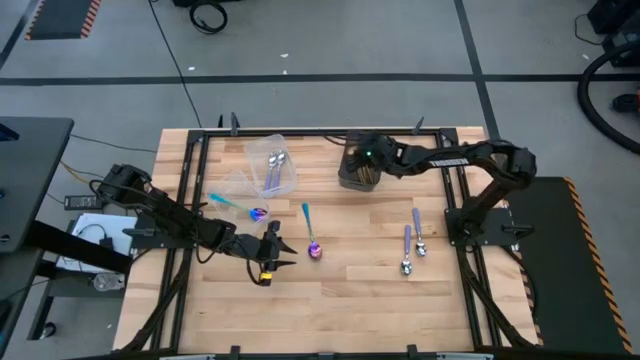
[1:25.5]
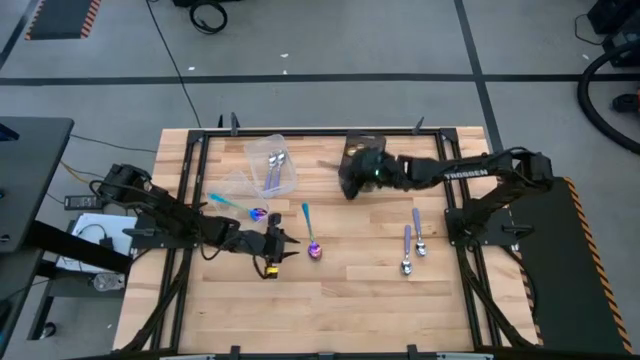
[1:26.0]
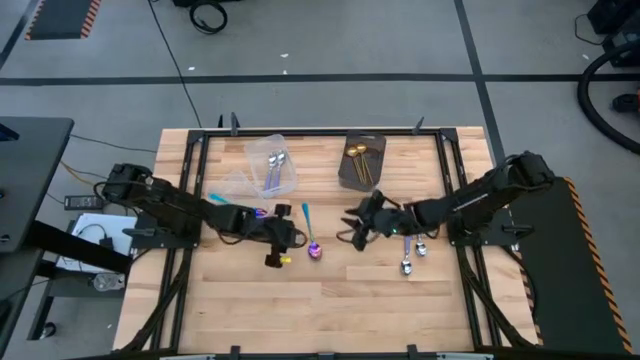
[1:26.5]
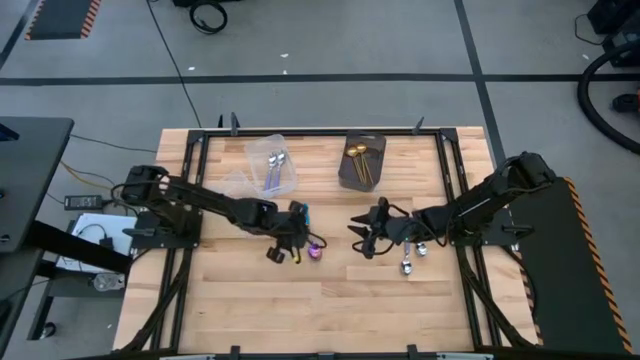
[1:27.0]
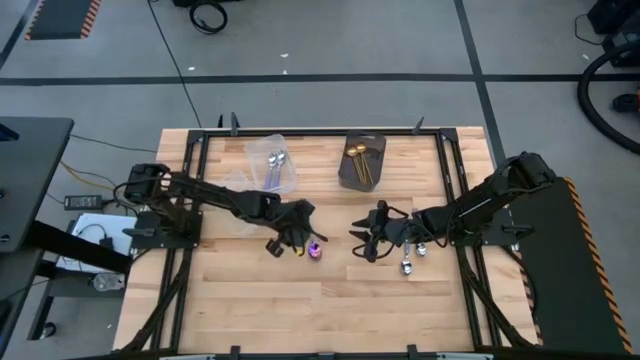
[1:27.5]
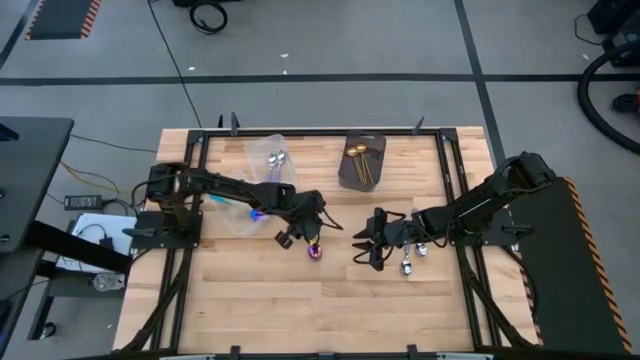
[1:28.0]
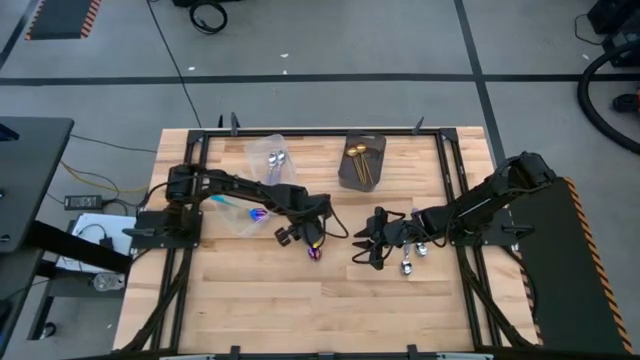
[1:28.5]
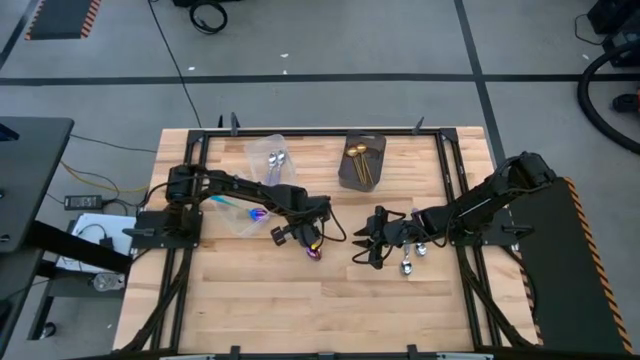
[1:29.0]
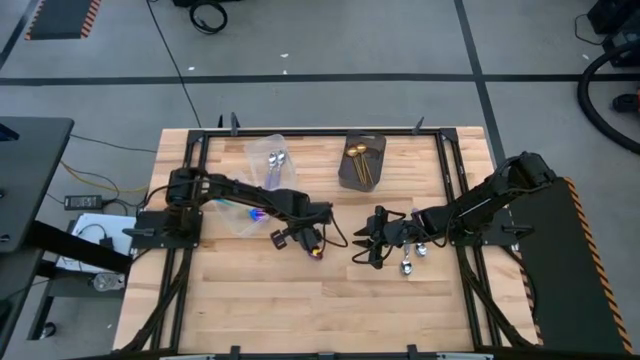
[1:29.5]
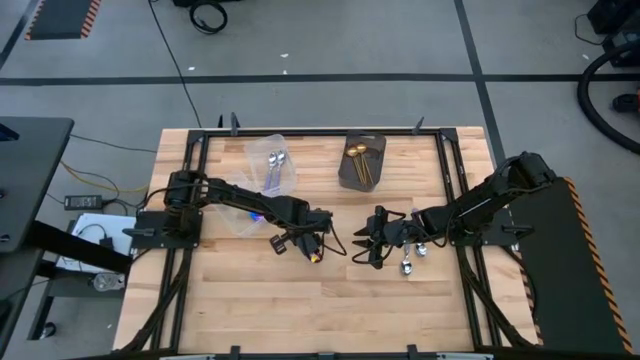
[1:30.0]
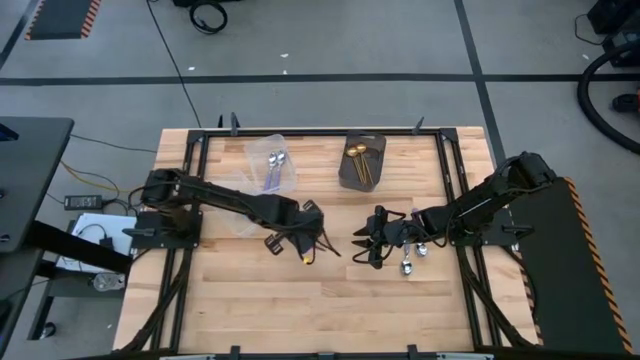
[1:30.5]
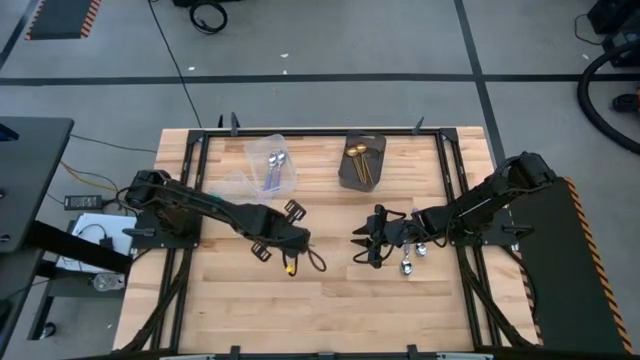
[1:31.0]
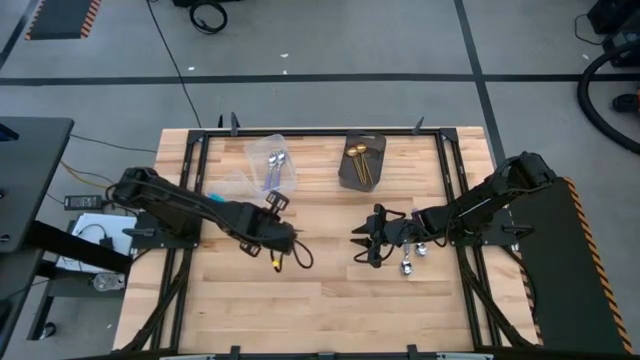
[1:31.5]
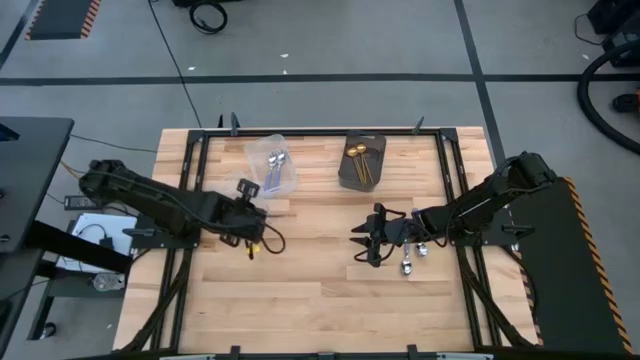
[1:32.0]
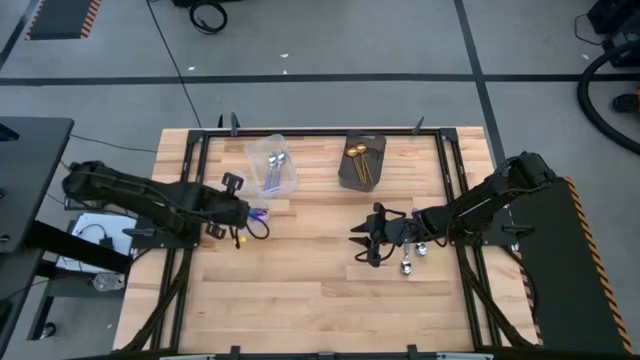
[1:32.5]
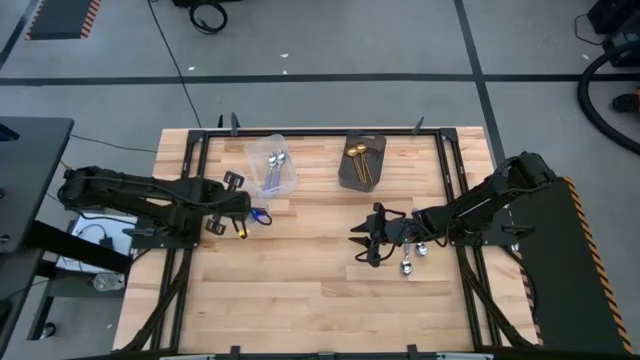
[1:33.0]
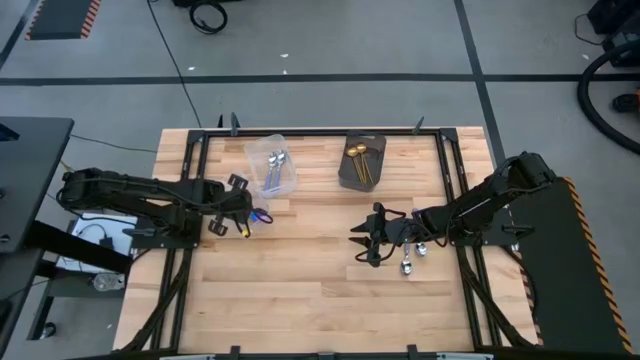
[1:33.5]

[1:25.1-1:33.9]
Task: Sort silverware by color (type)
Put the blue spoon into the left transparent bin

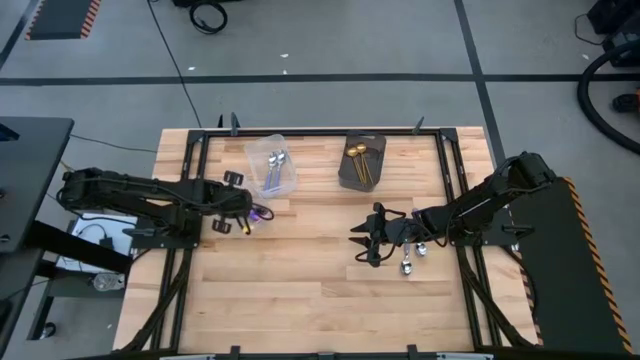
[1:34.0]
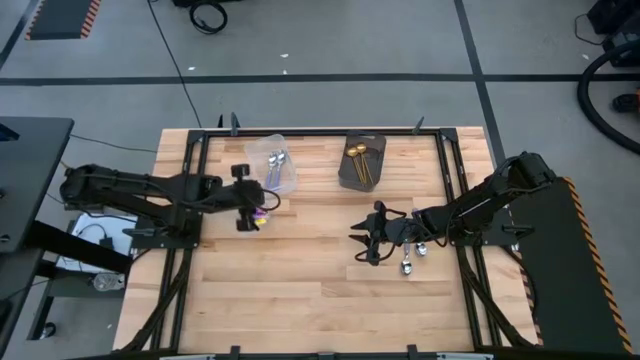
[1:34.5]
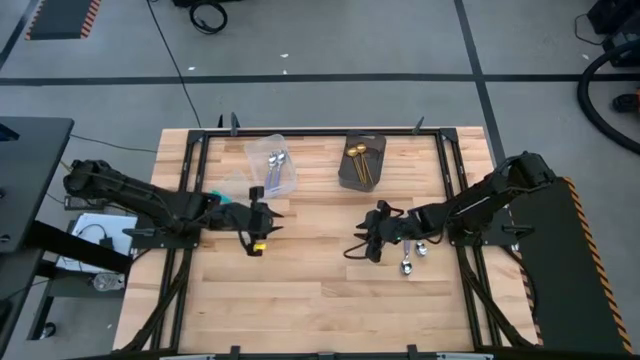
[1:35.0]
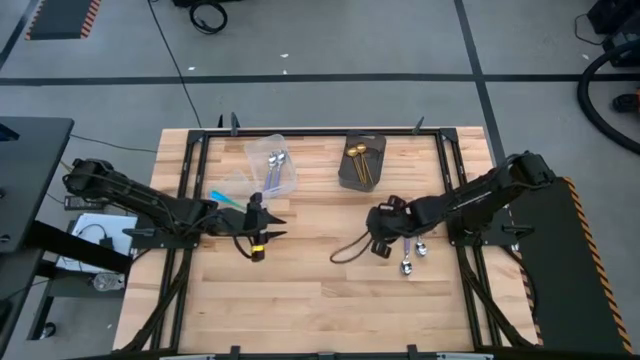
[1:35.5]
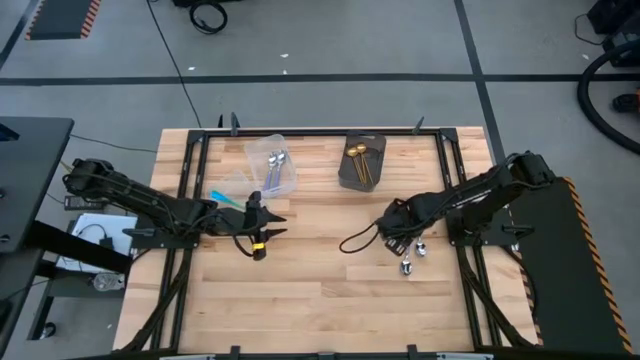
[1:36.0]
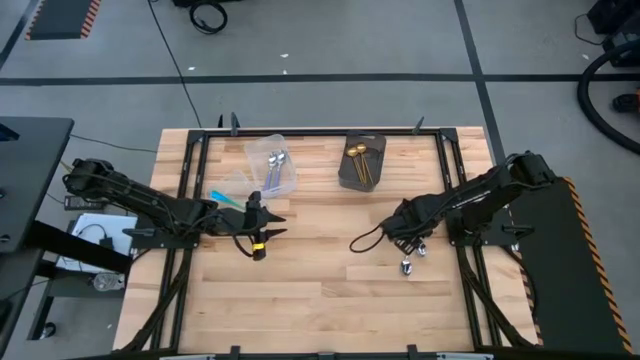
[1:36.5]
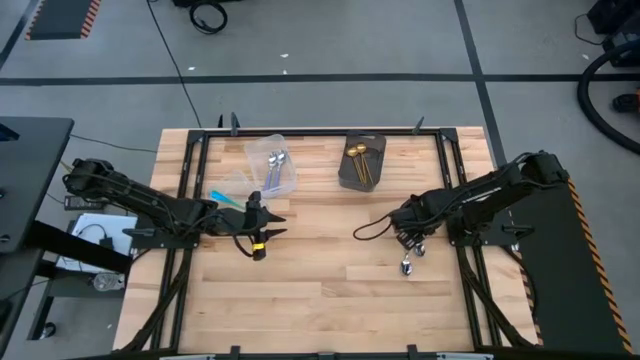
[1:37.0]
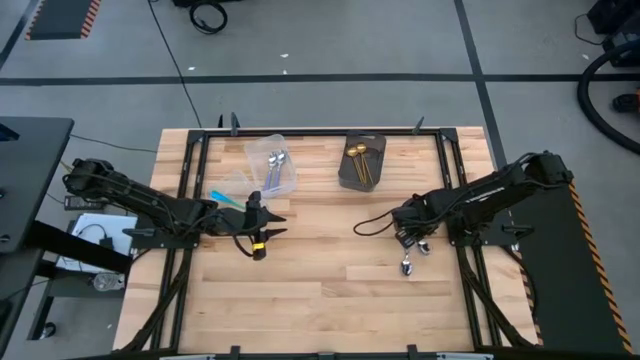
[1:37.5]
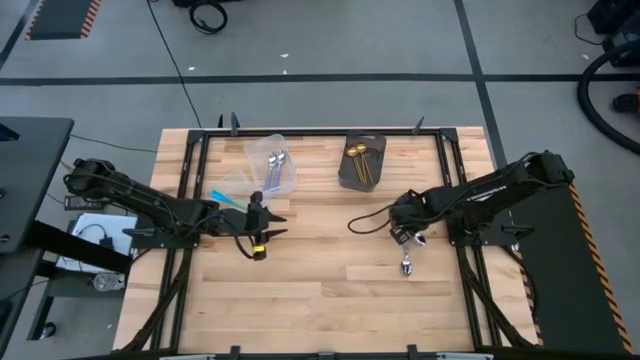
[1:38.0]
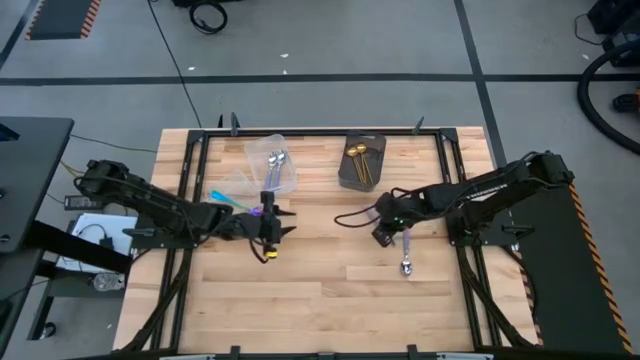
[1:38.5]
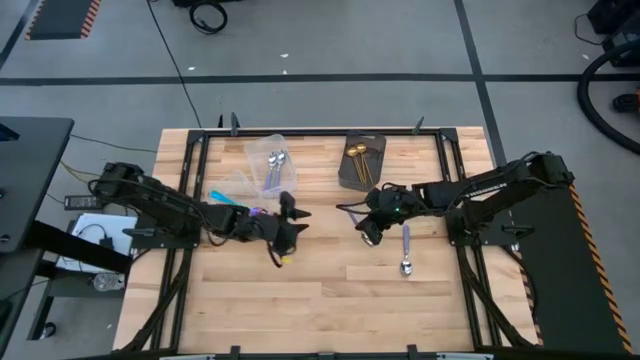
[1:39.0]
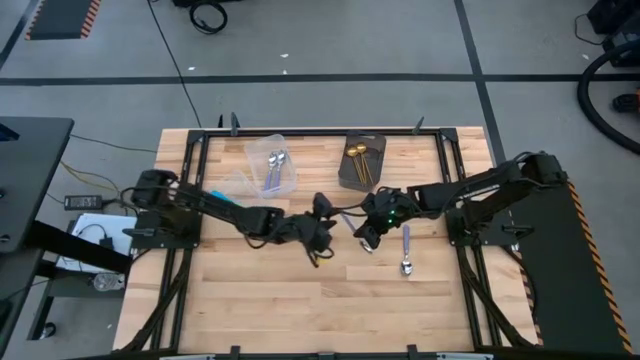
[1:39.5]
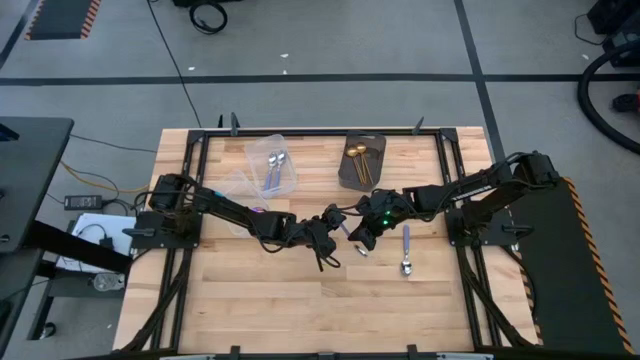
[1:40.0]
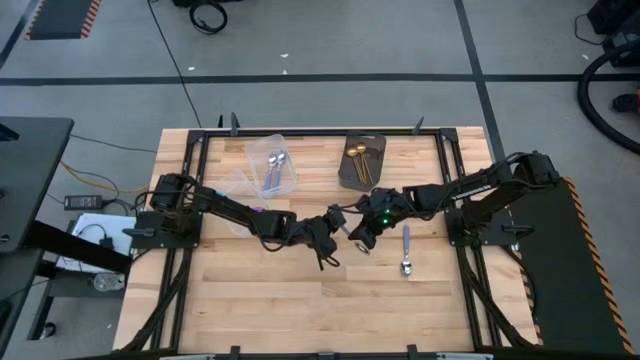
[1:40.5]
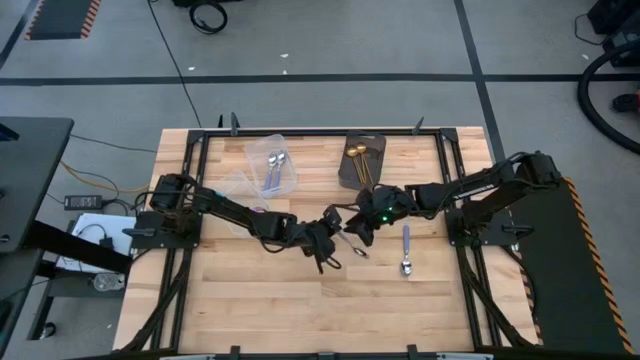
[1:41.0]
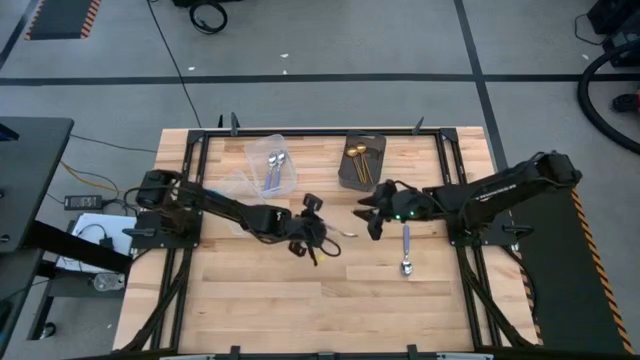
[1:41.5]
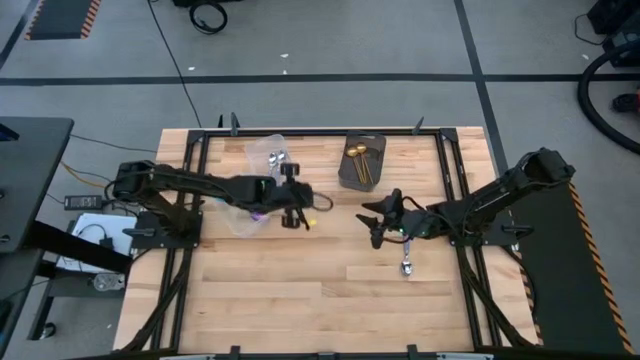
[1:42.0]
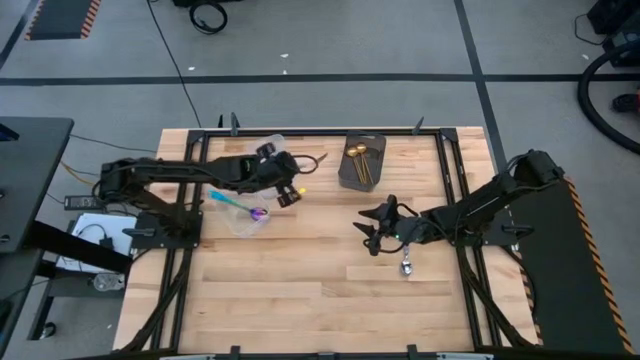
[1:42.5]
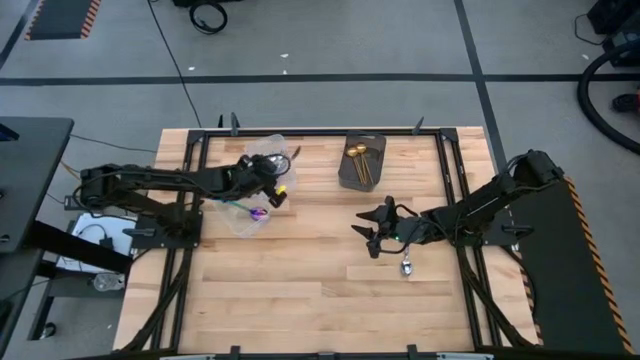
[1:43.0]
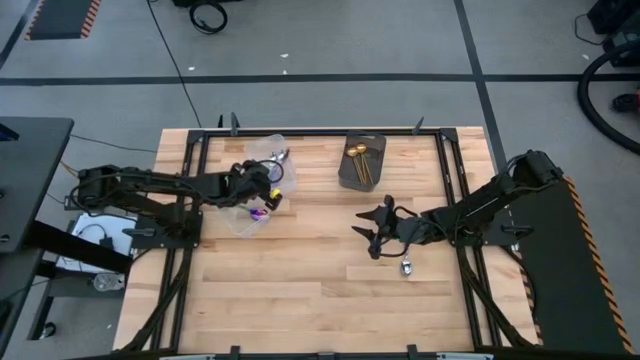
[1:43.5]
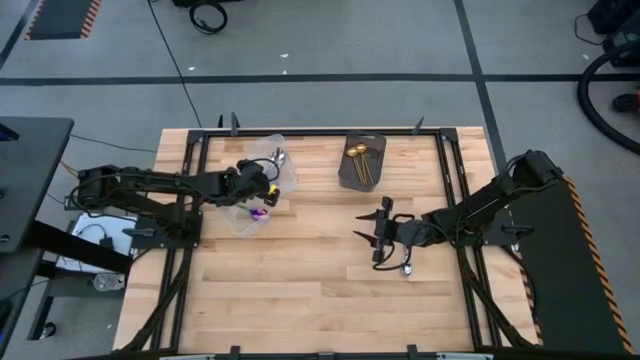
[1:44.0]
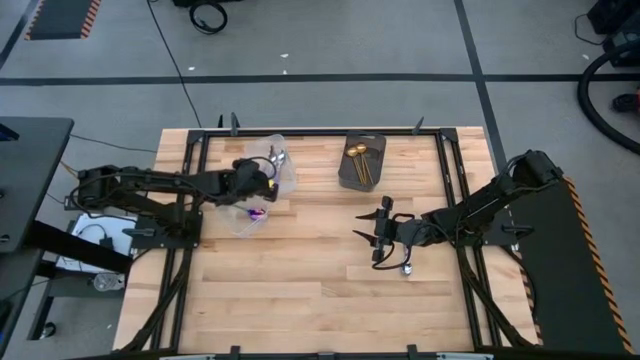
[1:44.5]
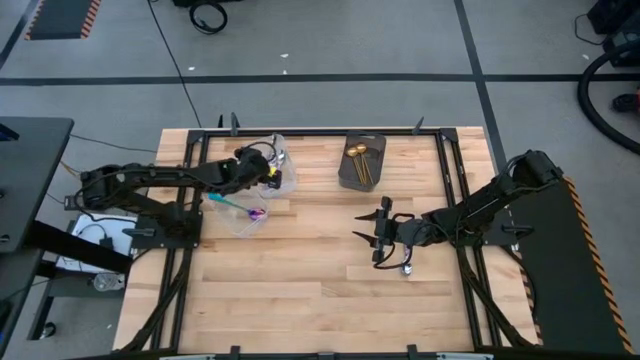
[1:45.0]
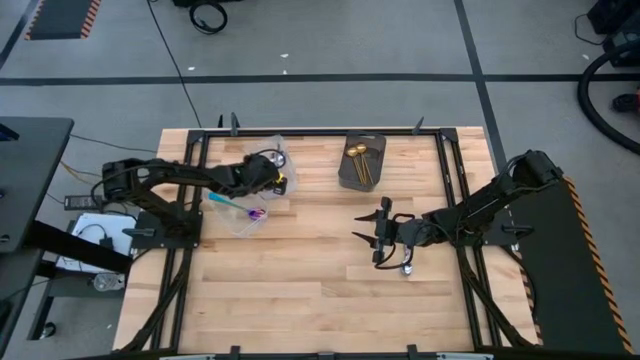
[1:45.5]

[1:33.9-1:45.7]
Put the purple spoon into the right transparent bin

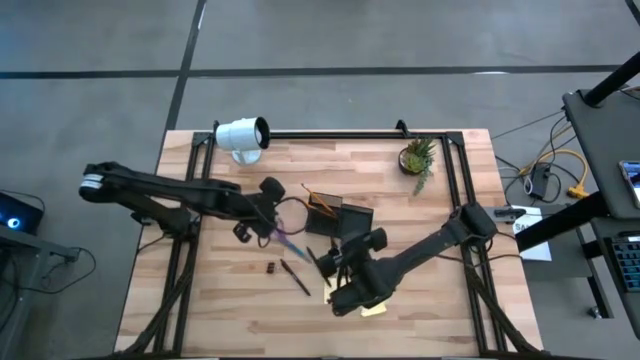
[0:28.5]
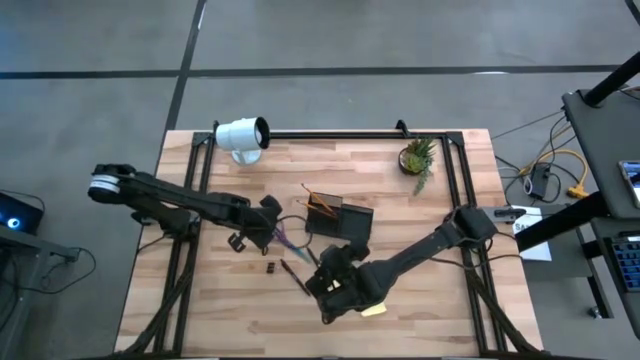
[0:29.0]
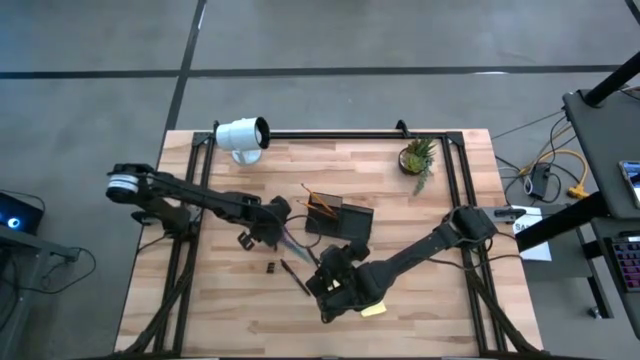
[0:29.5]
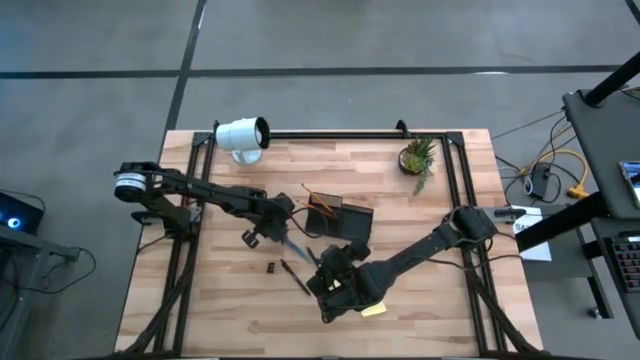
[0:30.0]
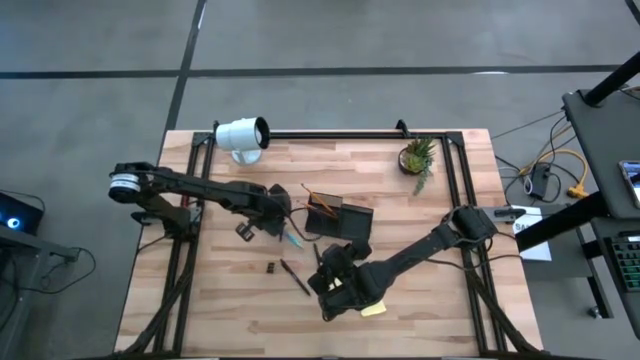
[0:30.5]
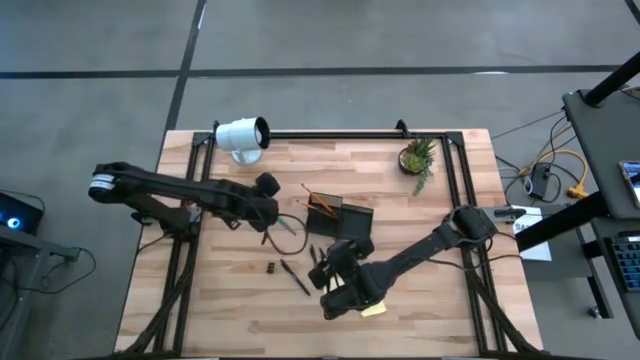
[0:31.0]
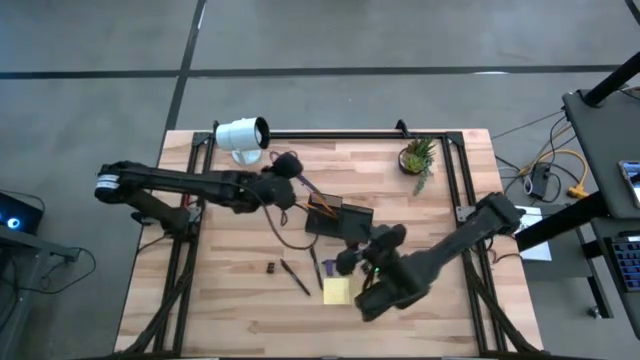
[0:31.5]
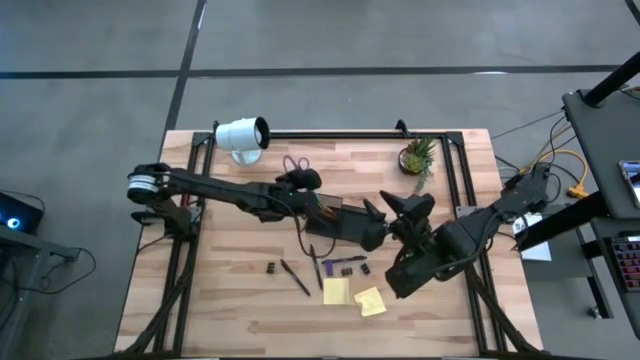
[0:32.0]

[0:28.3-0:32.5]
Task: Pick and place office supplies into organizer
Put the purple scissors into the black desk organizer
